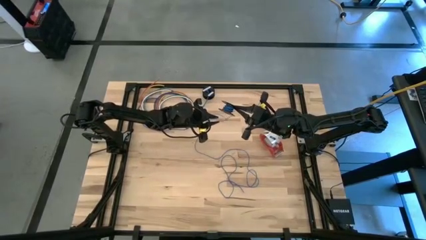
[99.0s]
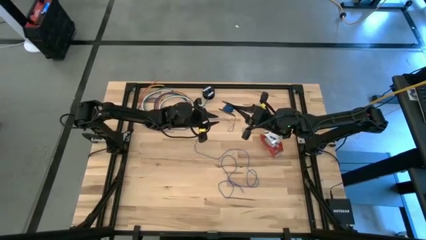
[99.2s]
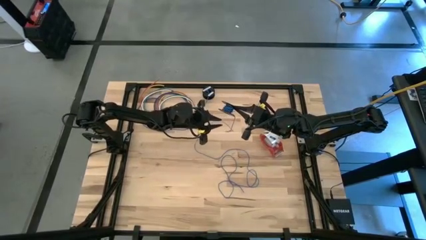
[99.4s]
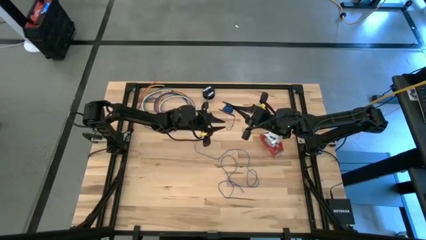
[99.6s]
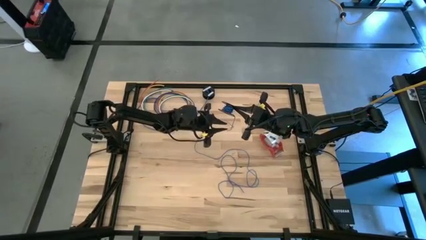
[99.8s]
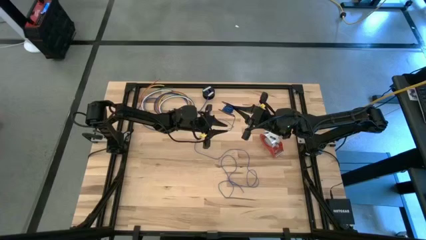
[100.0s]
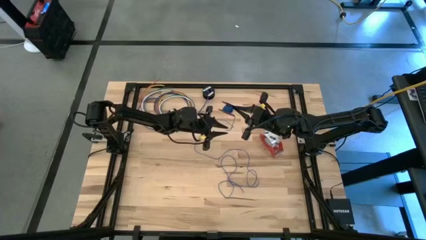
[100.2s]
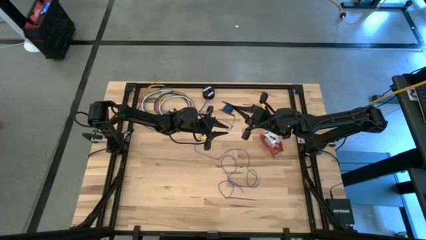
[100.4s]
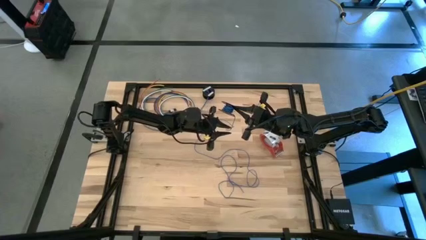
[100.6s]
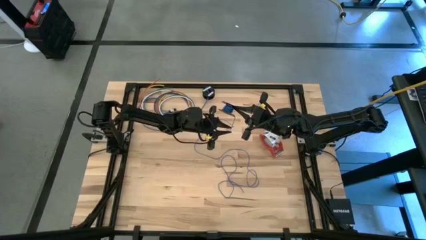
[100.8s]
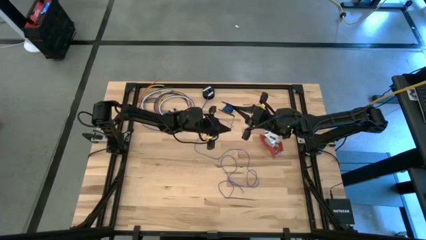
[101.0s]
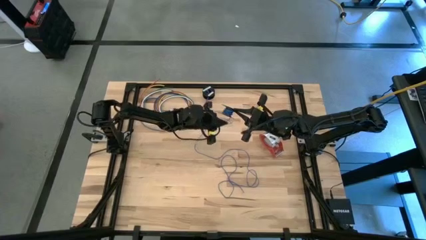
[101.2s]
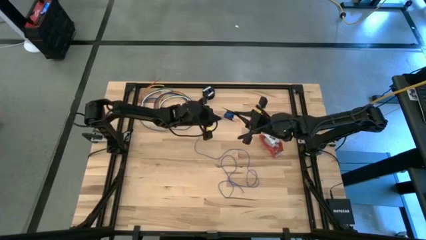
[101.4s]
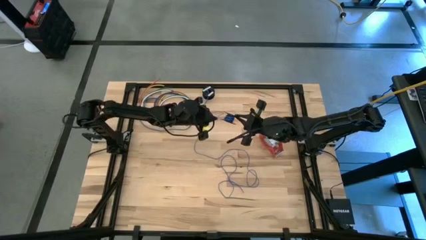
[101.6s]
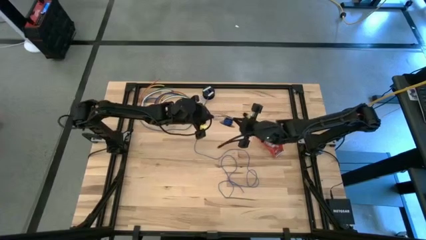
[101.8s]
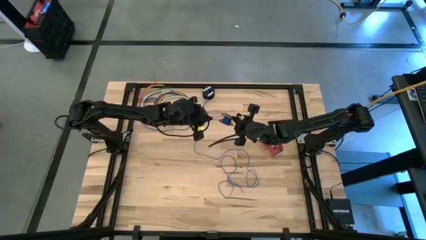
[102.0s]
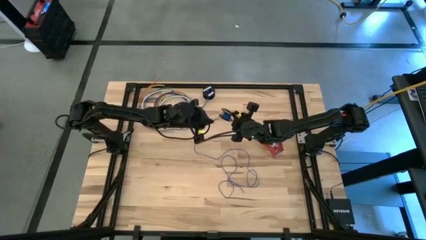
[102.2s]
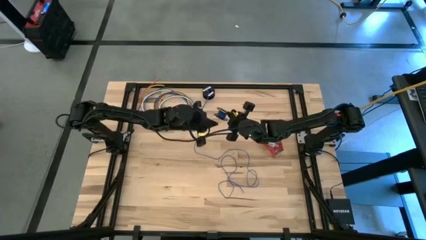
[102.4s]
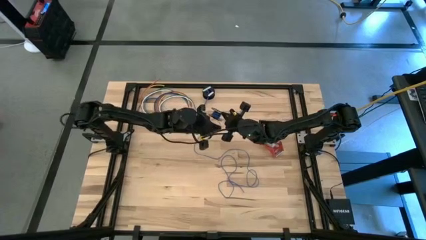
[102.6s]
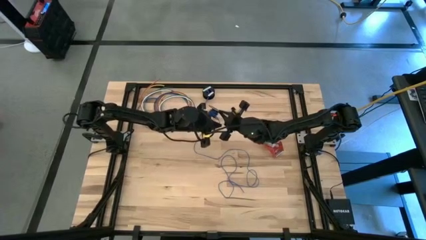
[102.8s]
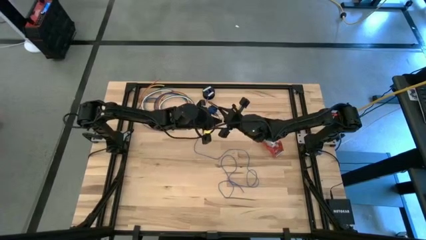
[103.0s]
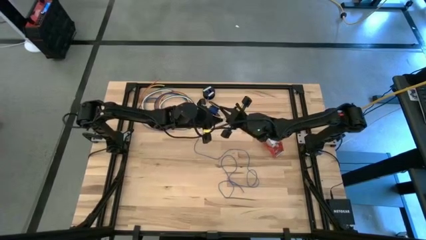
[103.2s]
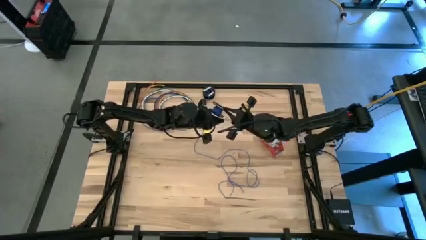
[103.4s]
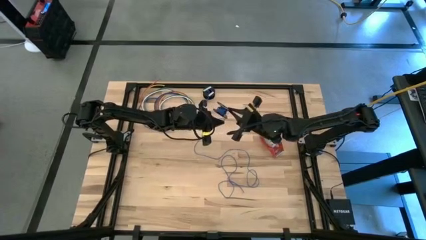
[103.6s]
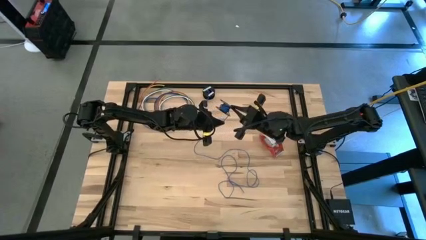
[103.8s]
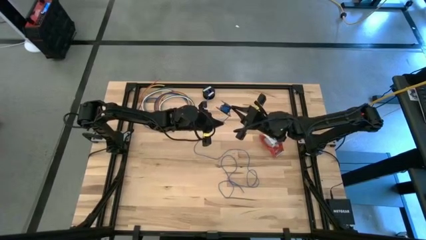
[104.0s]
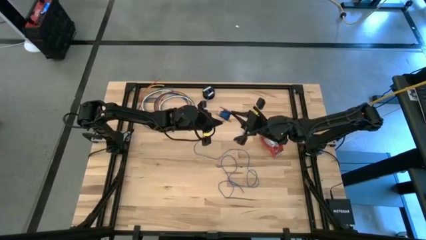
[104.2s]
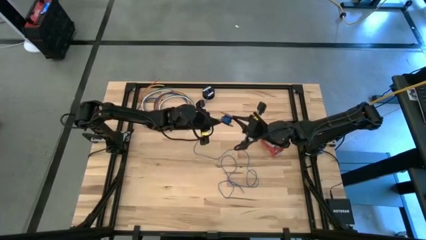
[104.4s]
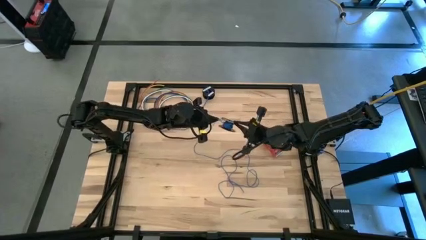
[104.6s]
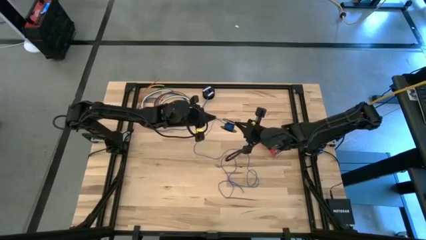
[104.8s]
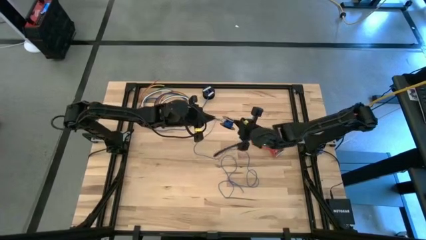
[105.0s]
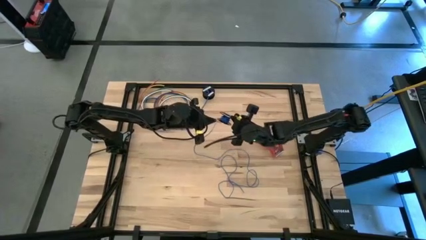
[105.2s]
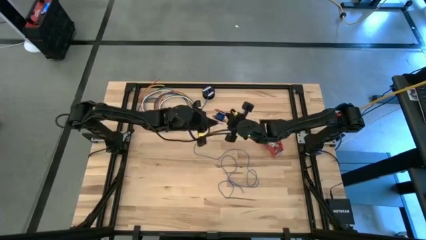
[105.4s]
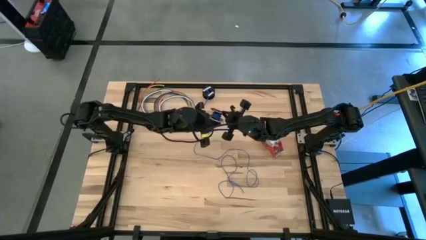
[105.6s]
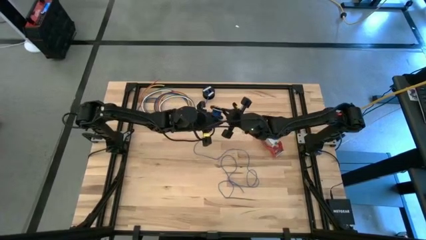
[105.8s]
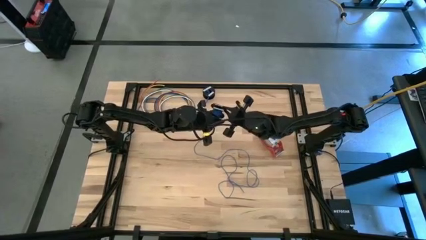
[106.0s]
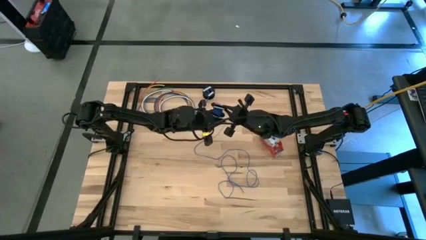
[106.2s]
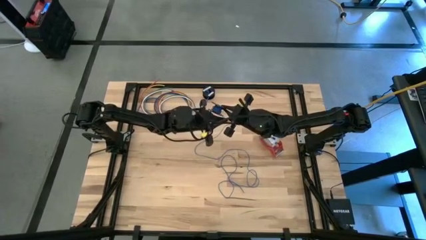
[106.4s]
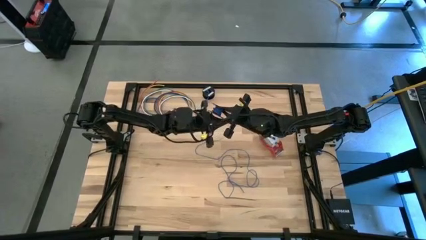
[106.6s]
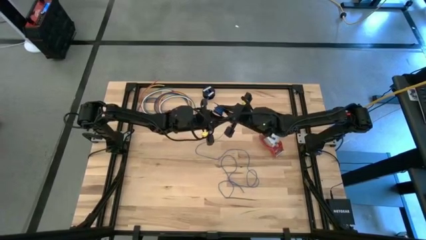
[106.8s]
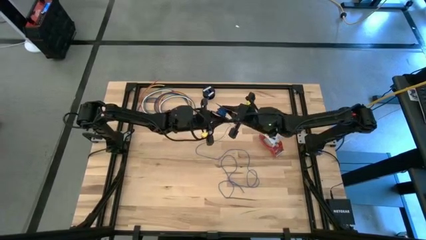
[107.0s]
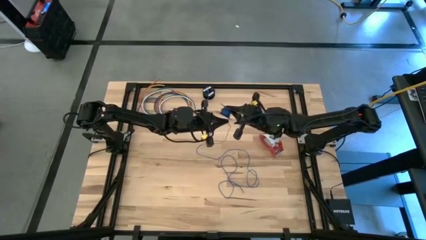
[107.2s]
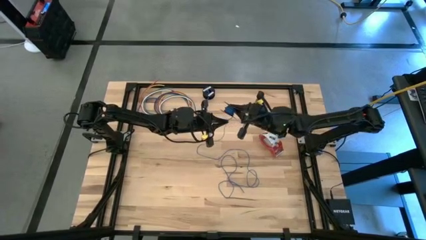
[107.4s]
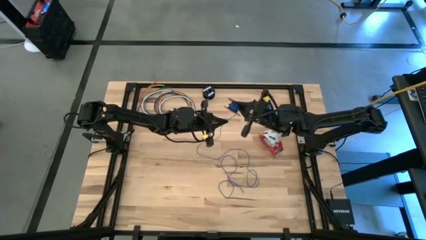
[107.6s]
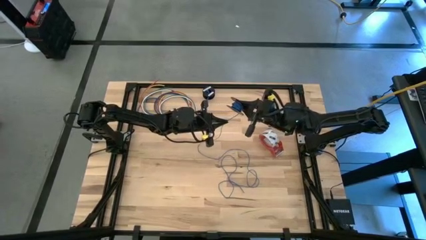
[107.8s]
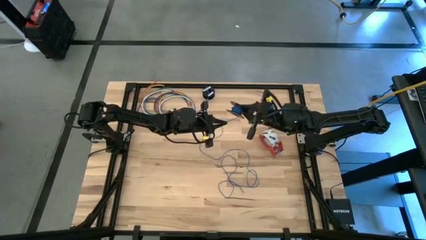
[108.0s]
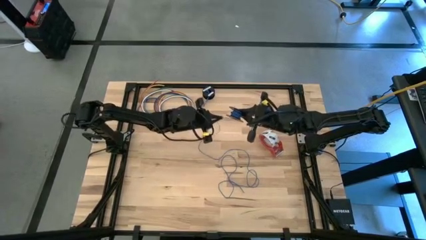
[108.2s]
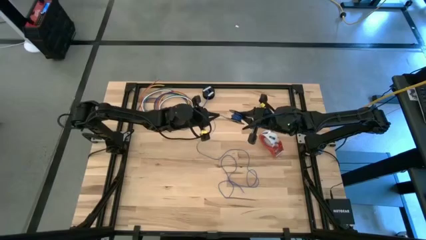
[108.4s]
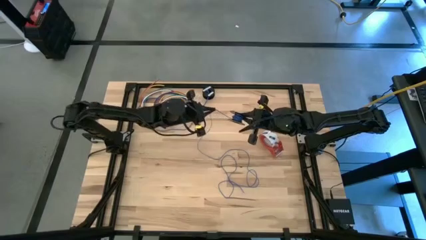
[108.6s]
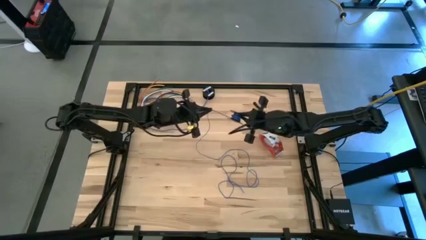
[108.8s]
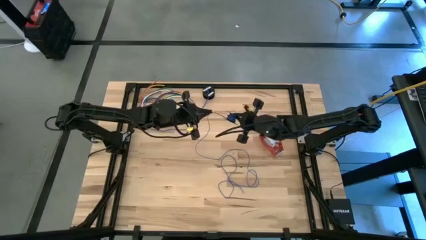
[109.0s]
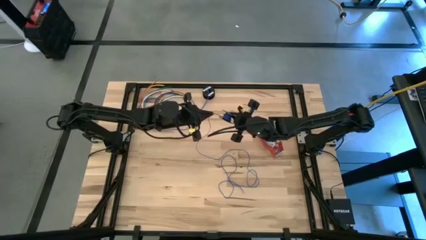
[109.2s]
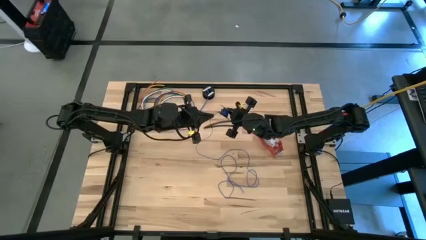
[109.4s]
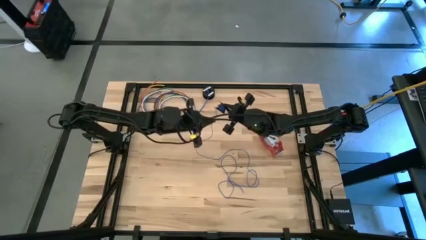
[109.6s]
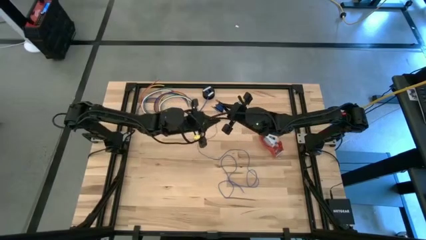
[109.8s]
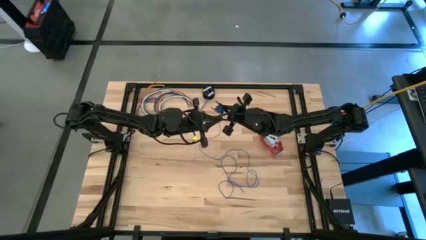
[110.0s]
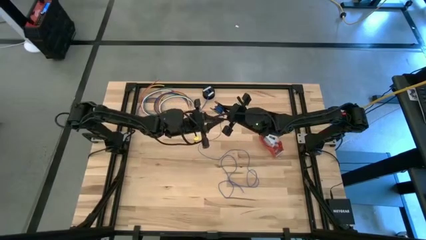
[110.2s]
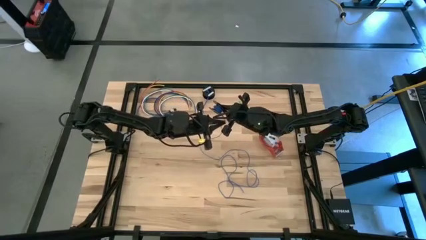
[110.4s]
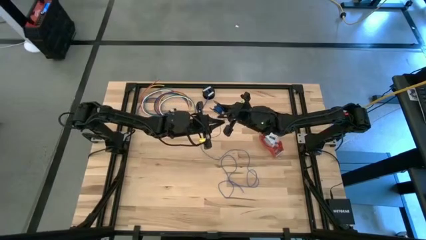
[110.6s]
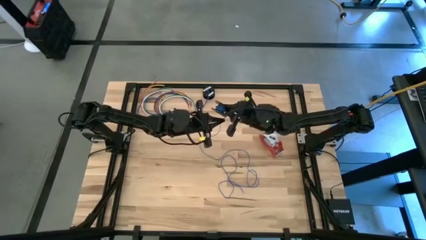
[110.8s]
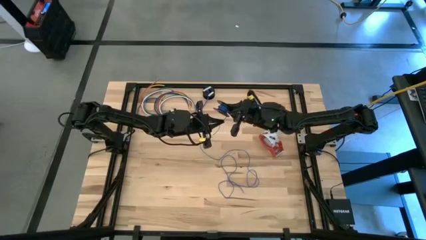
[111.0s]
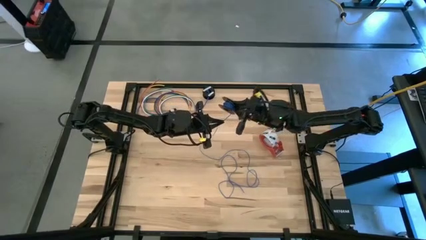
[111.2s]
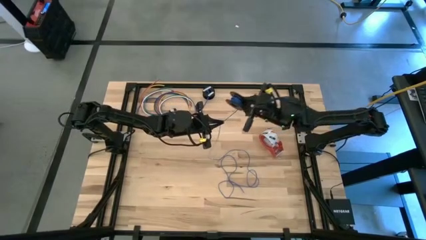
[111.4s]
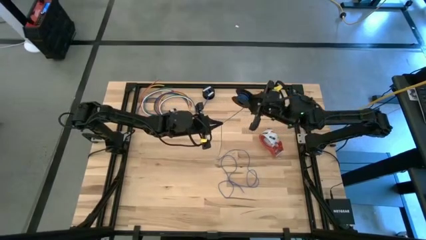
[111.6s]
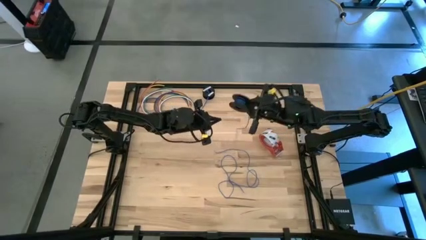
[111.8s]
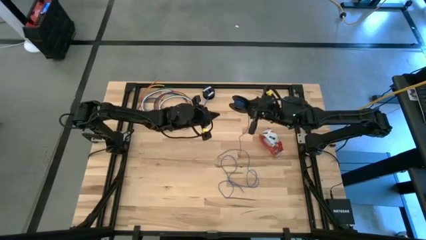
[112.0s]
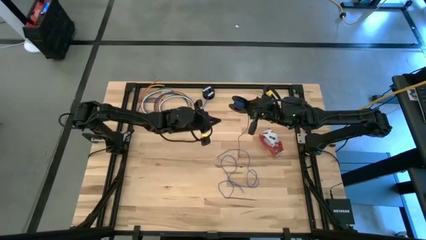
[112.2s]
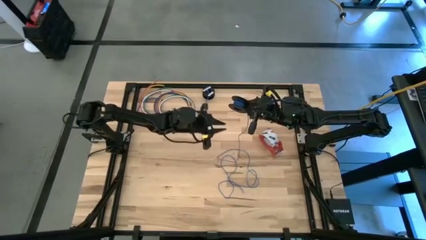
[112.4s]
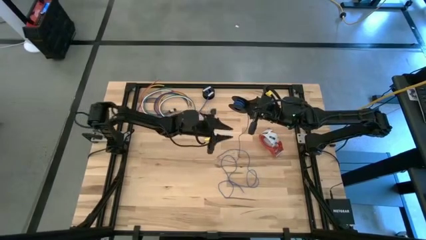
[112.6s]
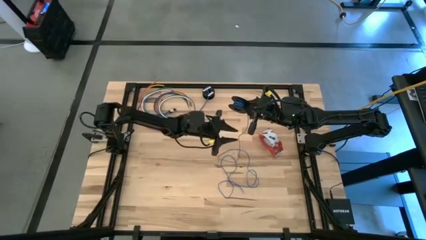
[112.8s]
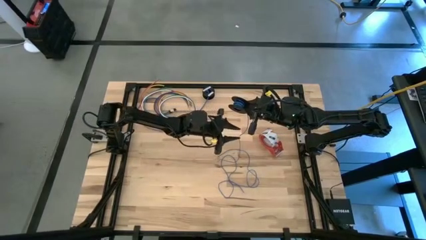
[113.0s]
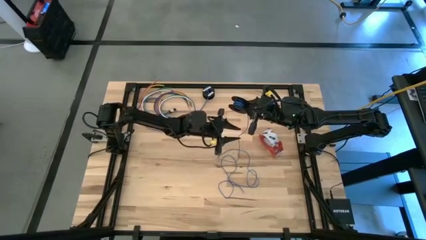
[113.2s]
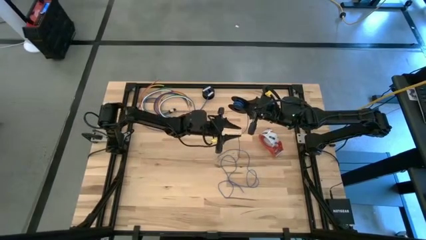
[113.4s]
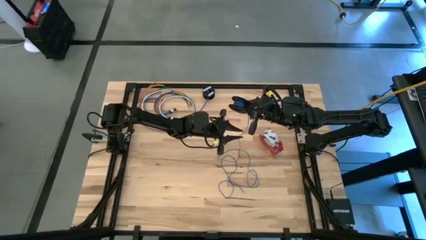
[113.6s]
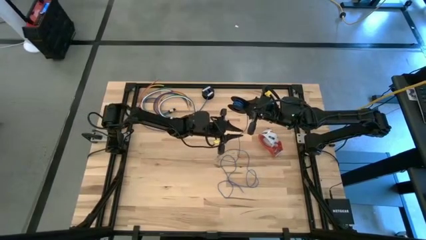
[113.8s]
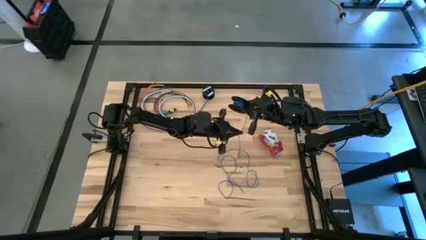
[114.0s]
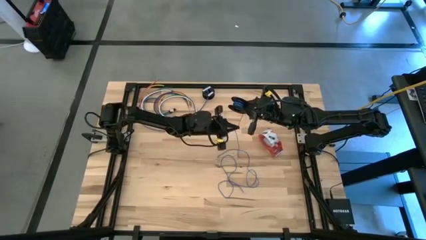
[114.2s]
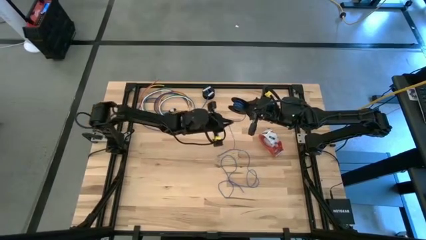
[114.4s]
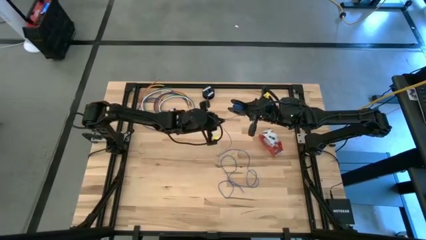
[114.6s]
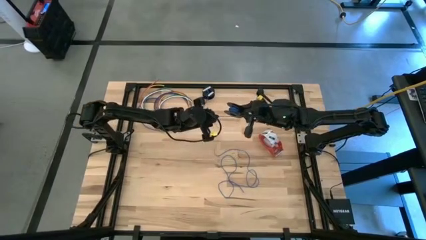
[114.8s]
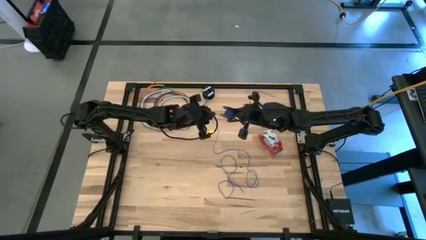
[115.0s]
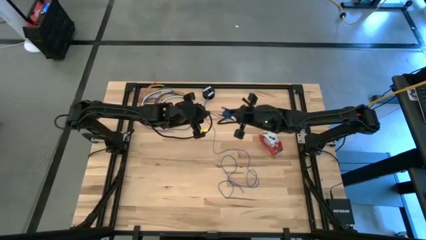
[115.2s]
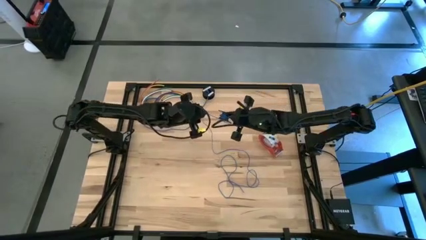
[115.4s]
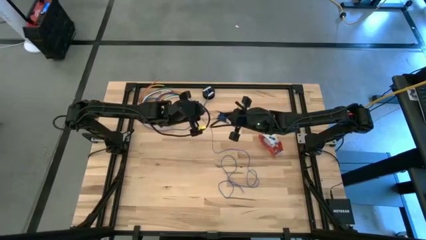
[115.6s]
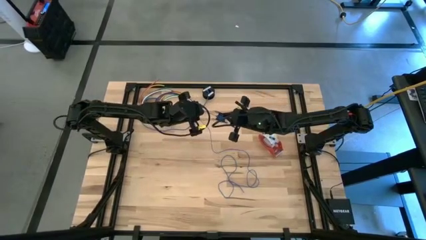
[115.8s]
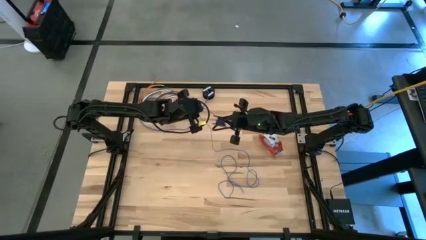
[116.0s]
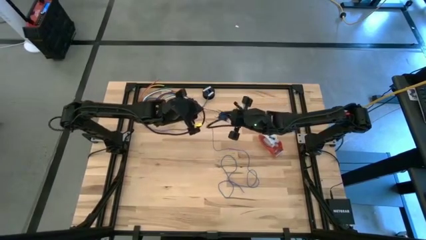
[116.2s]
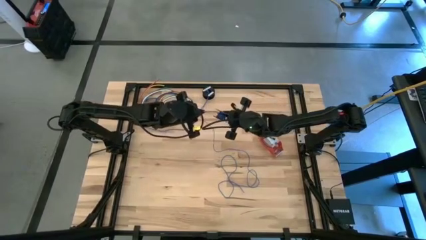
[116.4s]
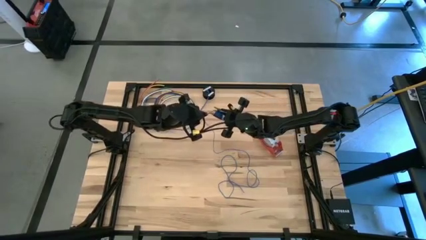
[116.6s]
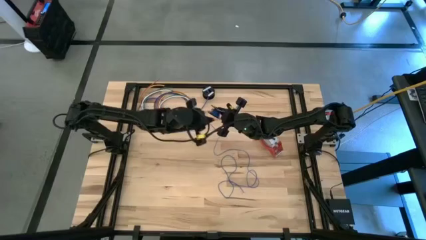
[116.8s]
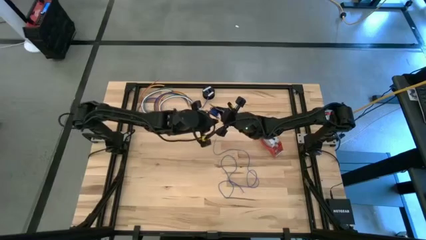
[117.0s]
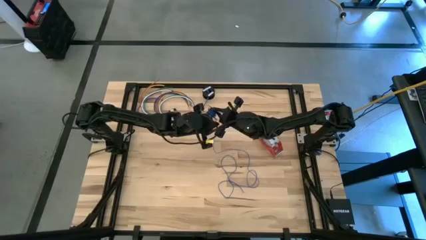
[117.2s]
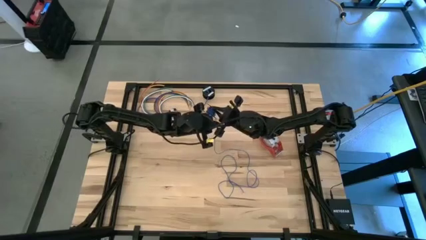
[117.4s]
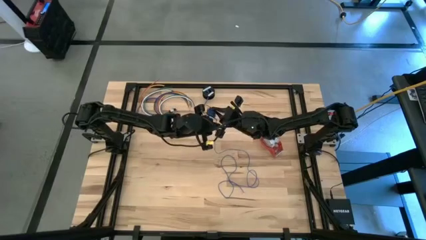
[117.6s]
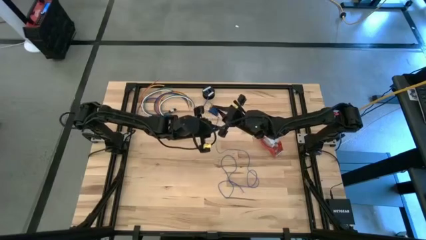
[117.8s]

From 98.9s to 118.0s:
Task: Coil cords
Coil the blue wire onto the spool
